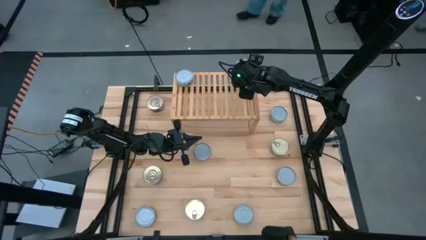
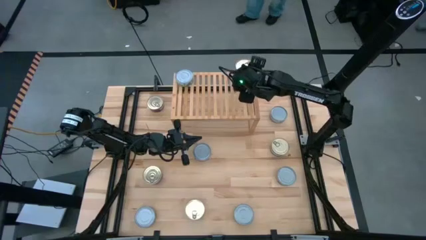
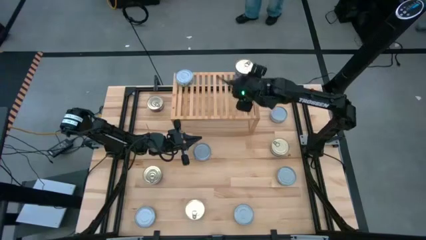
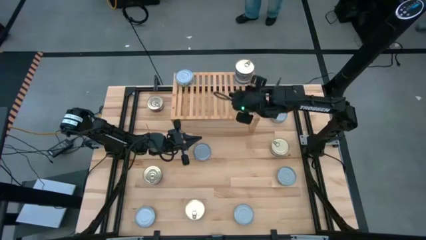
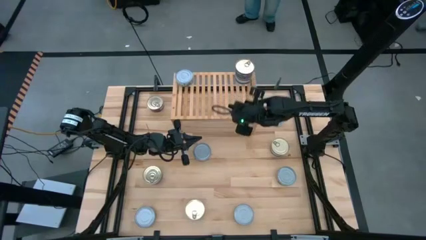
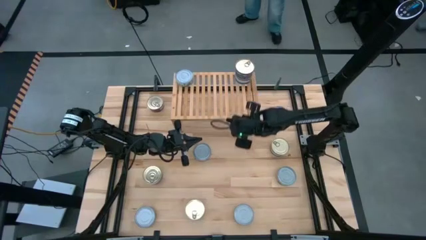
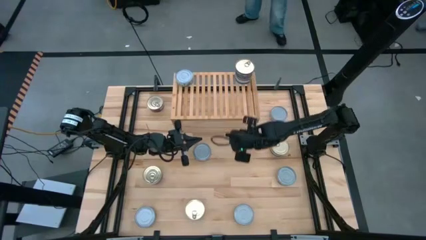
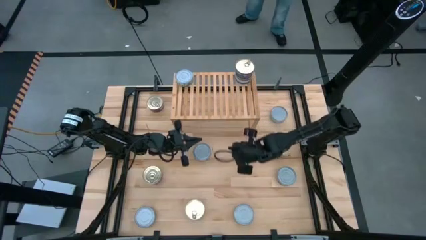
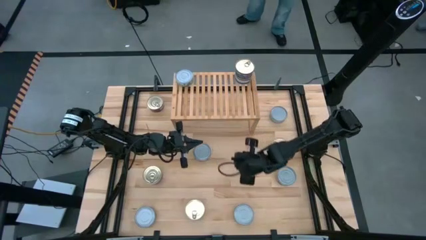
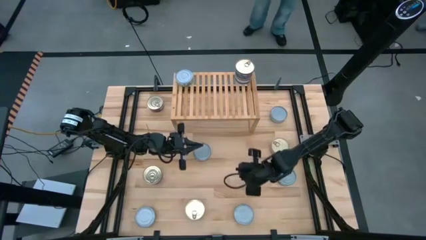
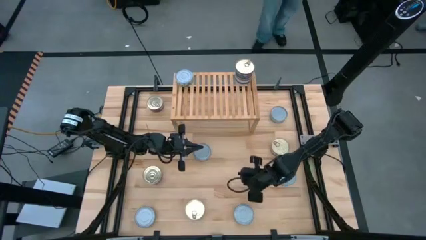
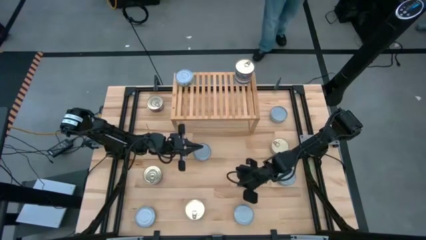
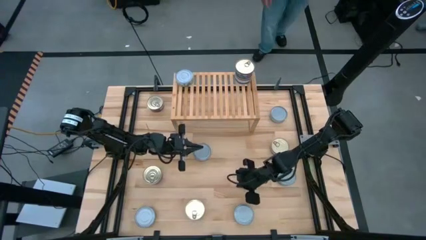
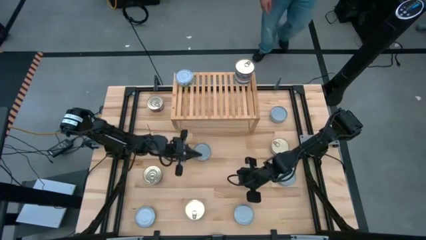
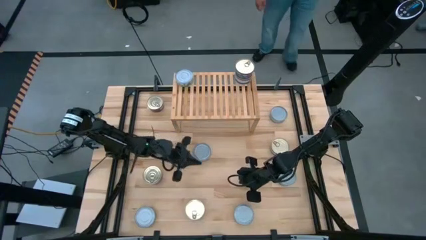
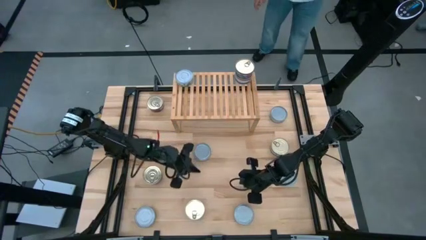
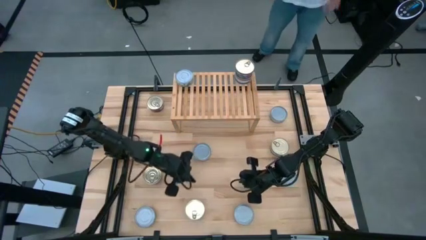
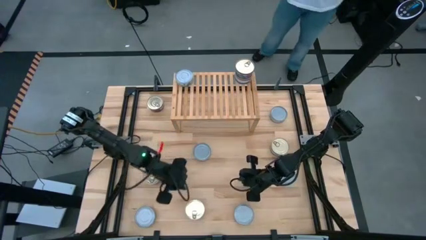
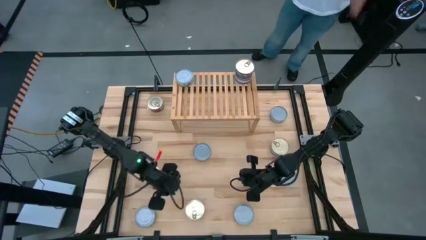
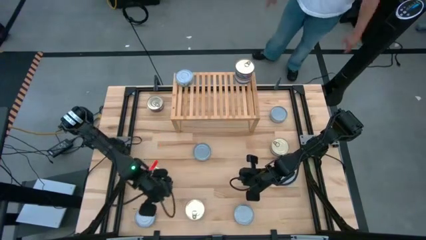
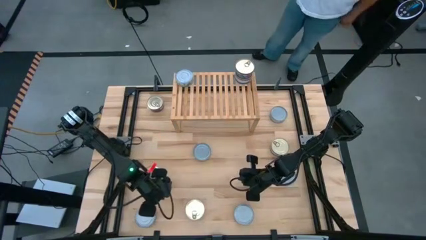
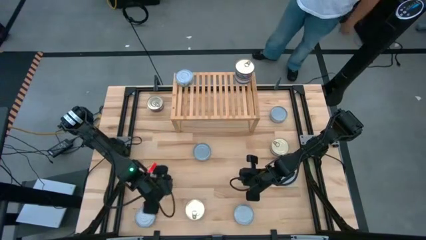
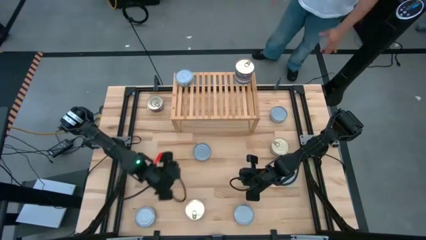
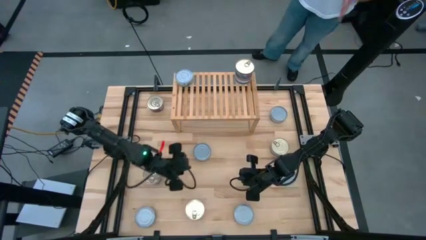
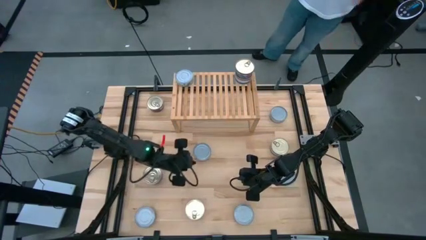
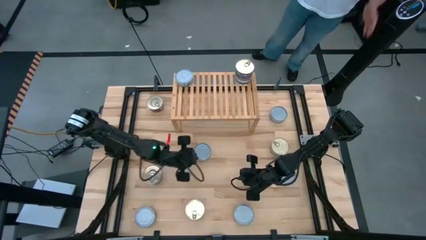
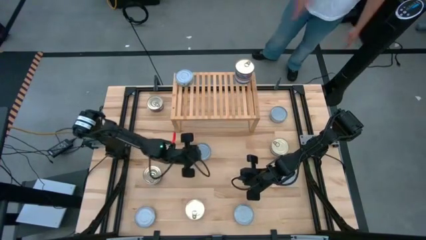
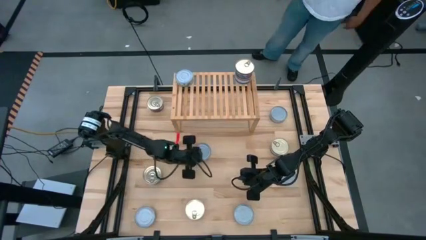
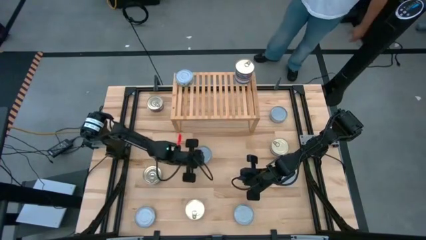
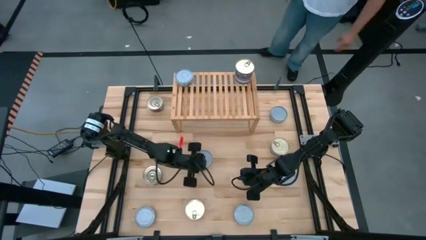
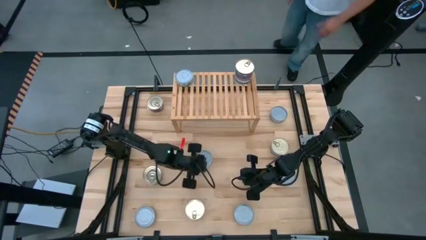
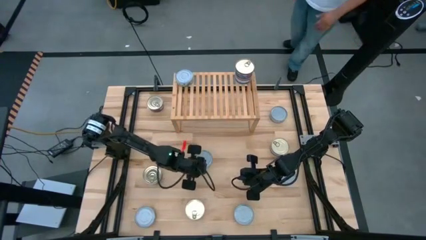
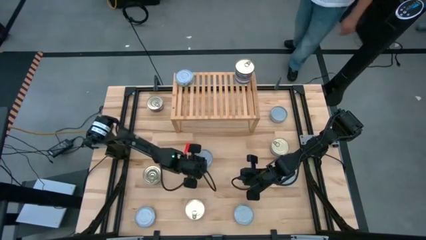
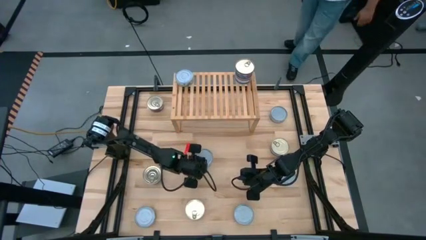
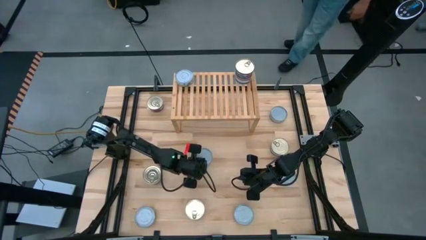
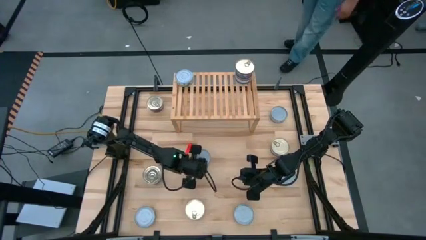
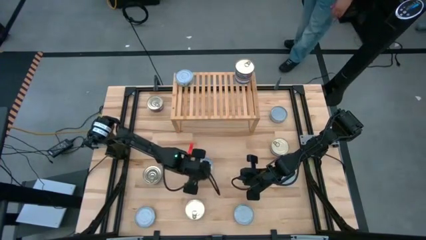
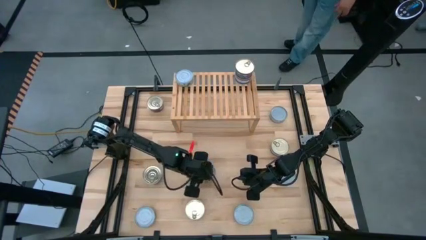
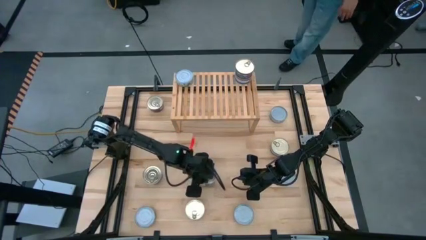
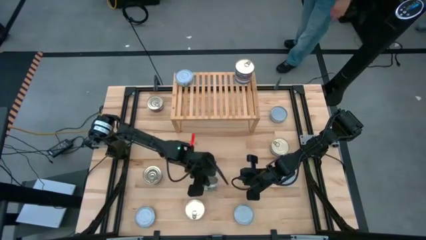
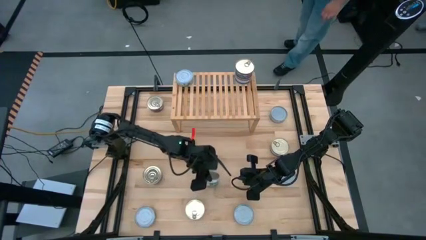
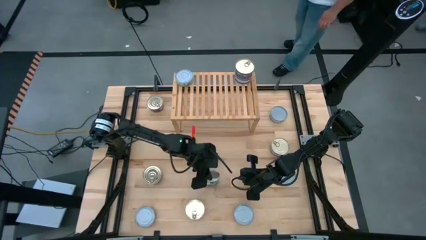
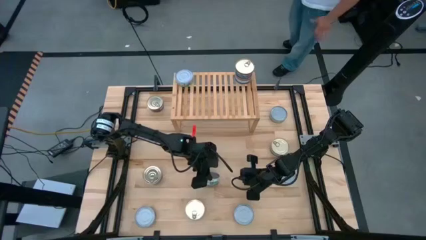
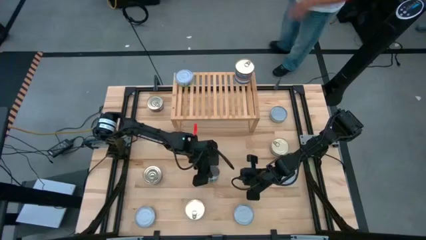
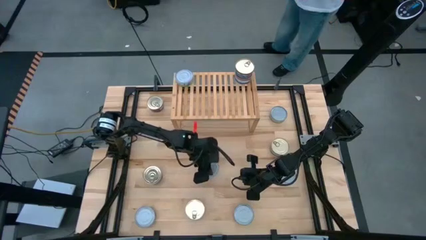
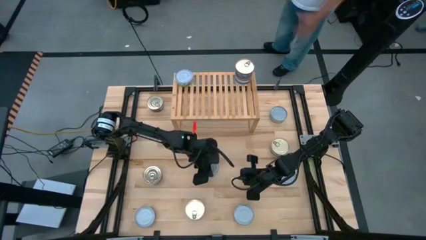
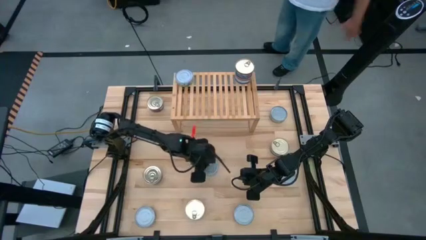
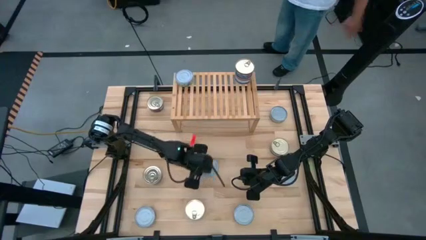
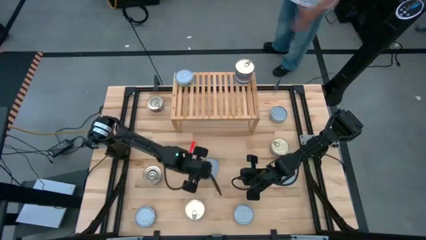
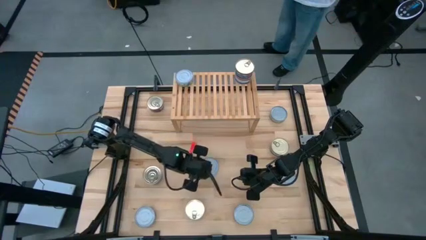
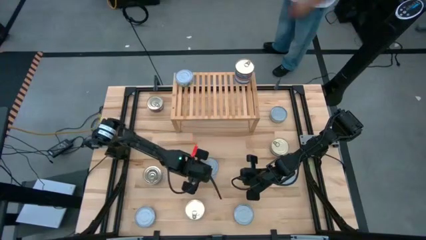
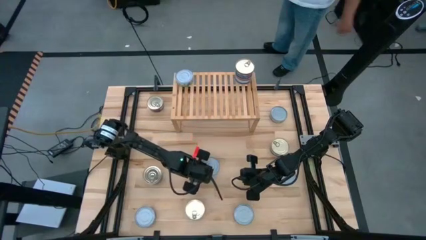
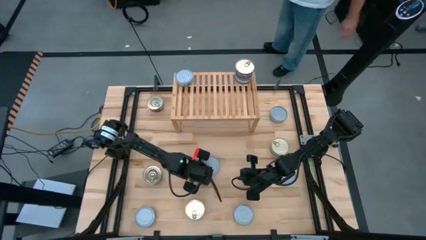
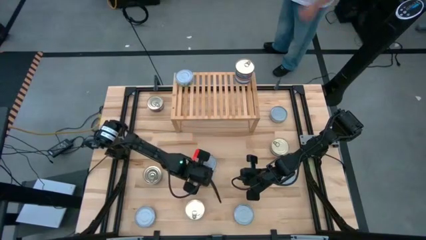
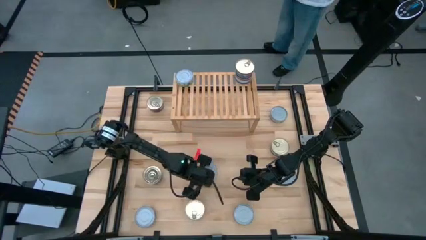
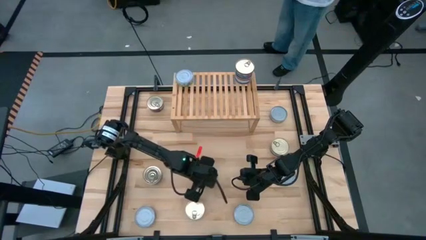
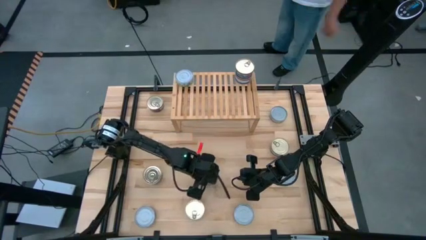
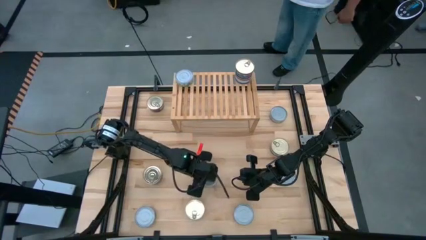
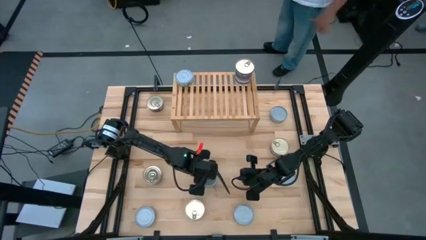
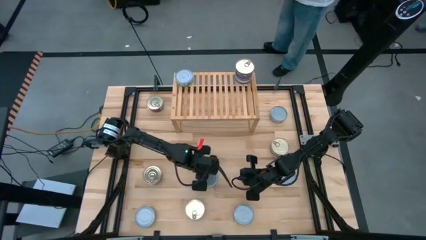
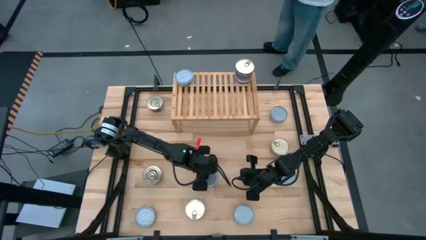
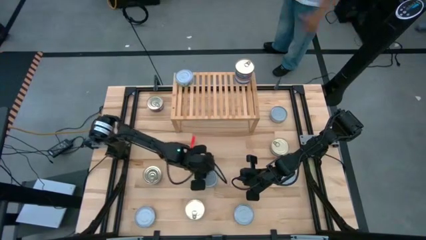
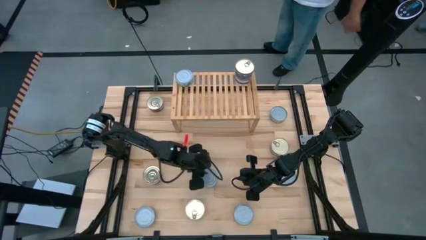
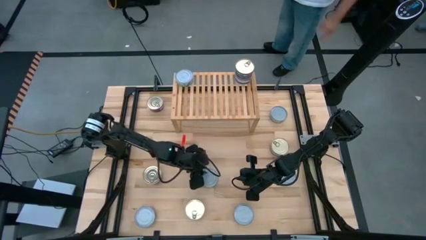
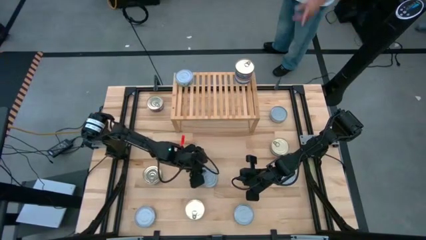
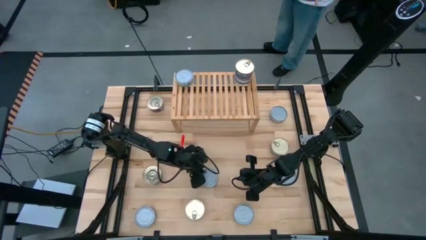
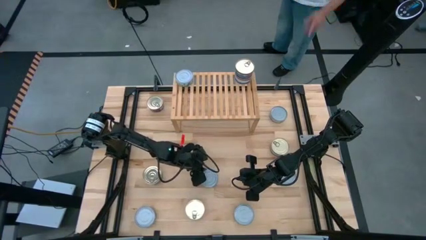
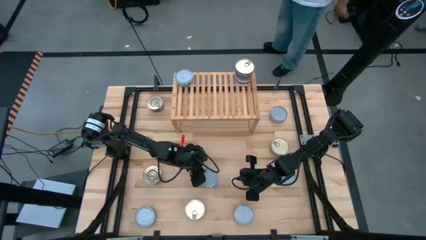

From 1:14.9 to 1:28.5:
Task: Stack canned seafood by type on shelf
Stack the green tuna can on top of the other green tuna can on the shelf

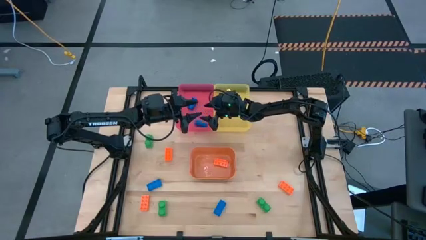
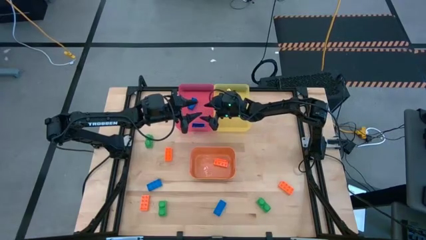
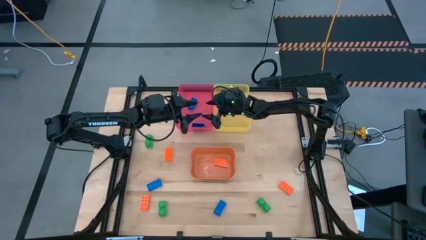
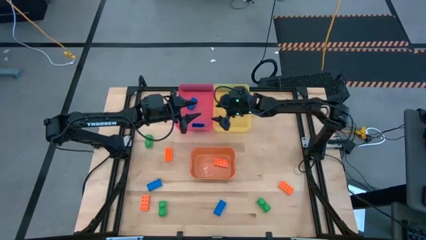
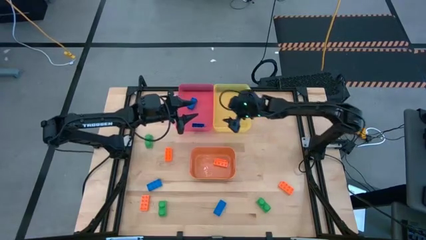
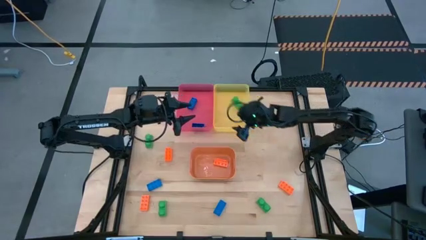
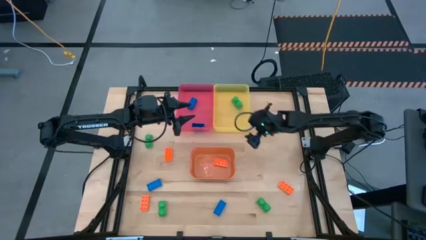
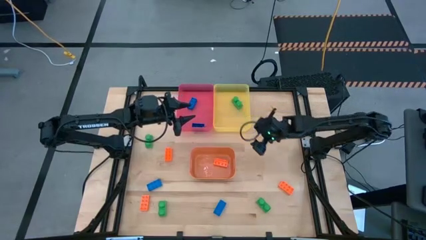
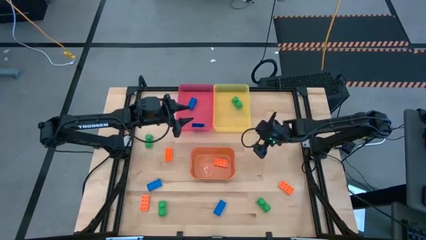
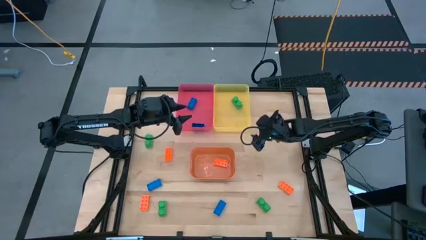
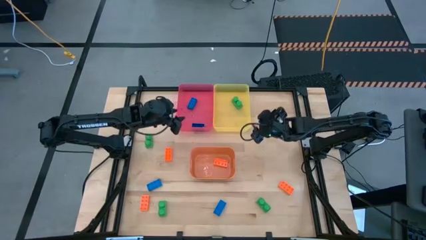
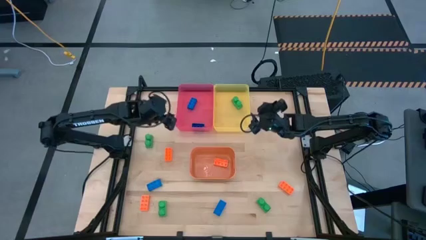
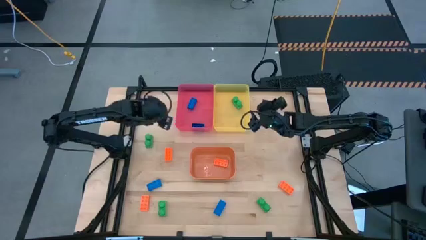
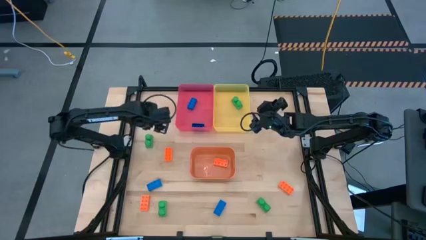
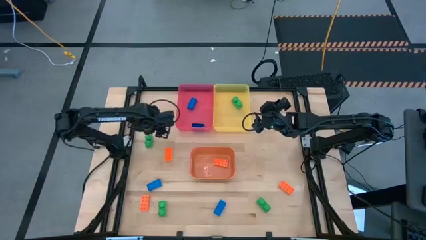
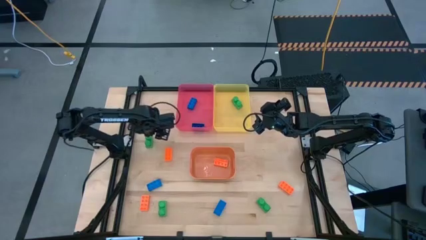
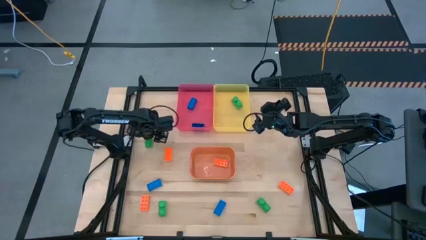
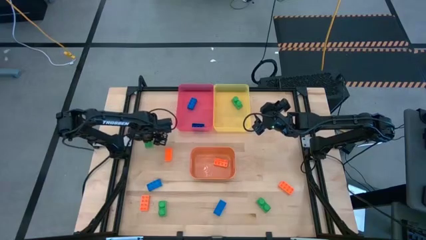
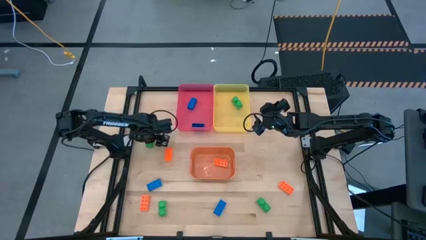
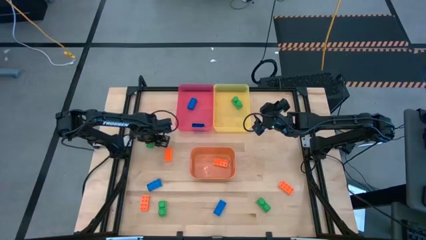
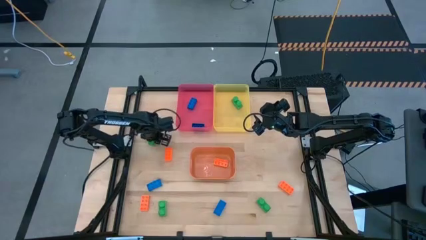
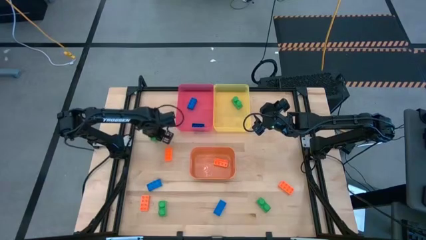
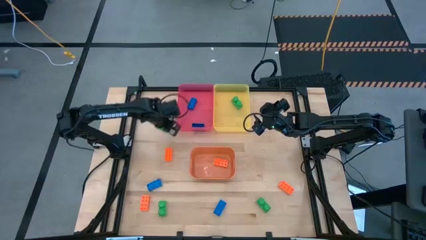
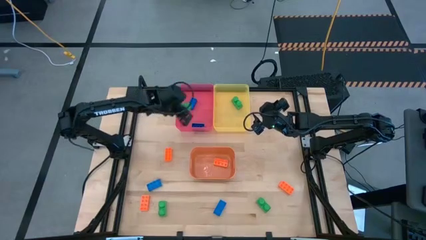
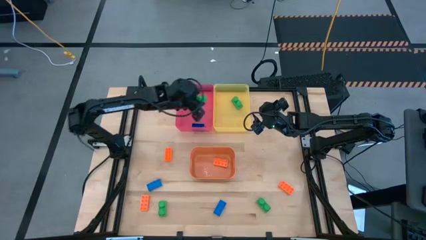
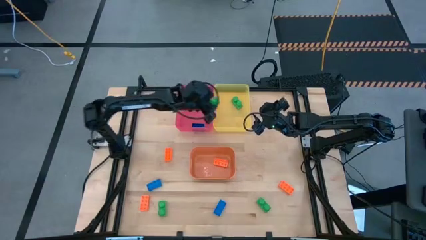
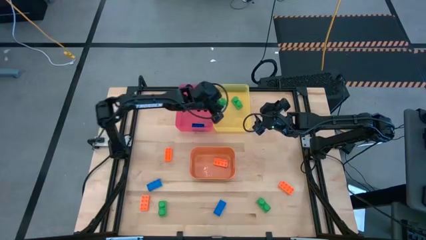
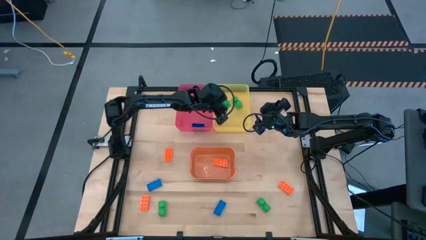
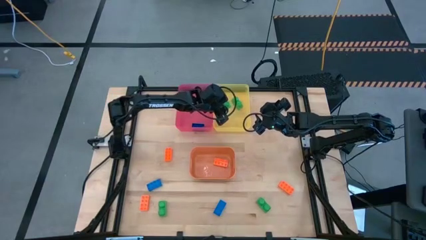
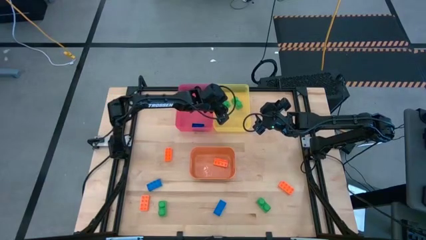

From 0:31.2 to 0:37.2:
Task: Sort & place blocks by color
Put the green game piece into the yellow bin
